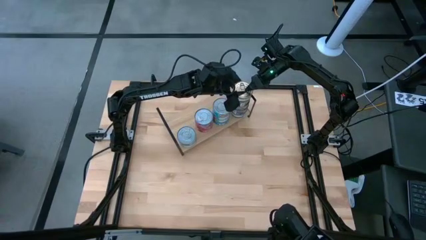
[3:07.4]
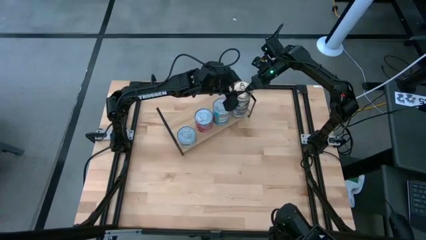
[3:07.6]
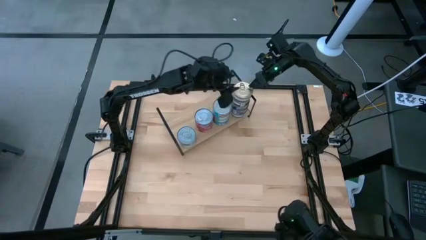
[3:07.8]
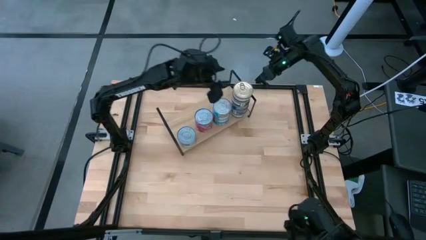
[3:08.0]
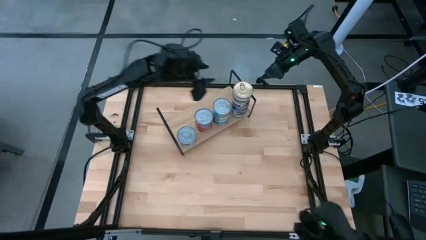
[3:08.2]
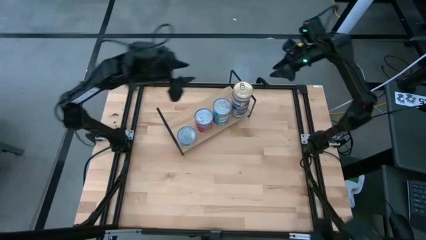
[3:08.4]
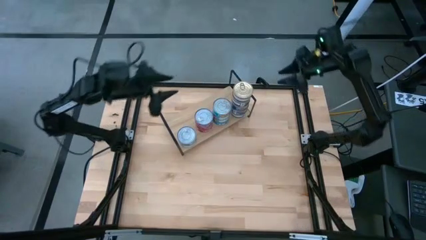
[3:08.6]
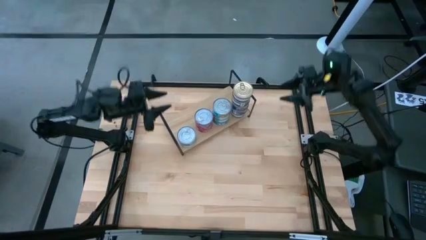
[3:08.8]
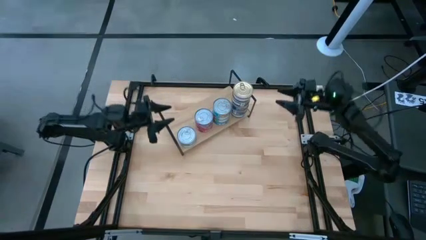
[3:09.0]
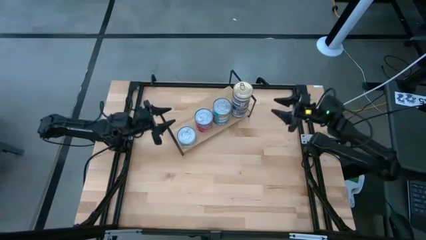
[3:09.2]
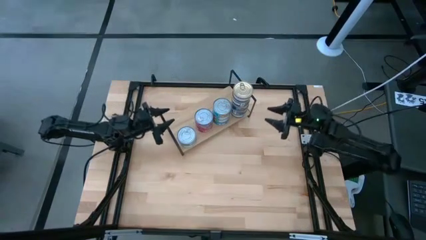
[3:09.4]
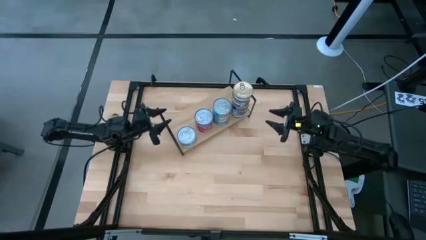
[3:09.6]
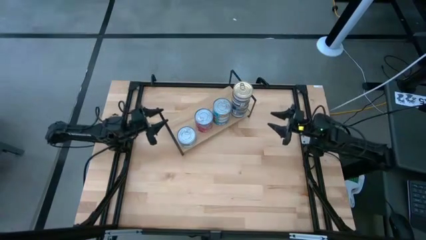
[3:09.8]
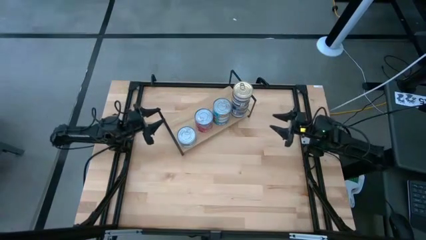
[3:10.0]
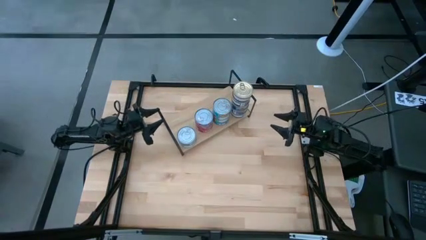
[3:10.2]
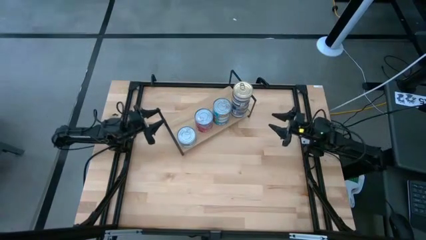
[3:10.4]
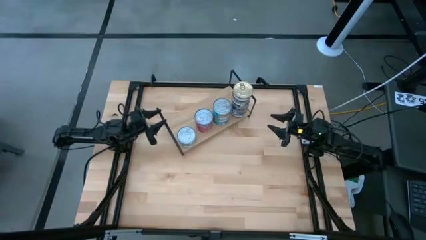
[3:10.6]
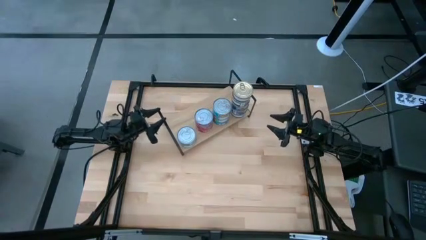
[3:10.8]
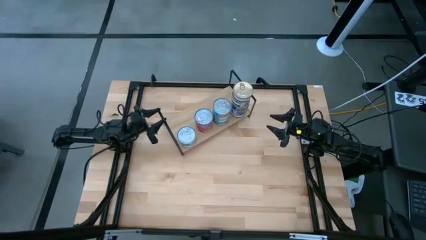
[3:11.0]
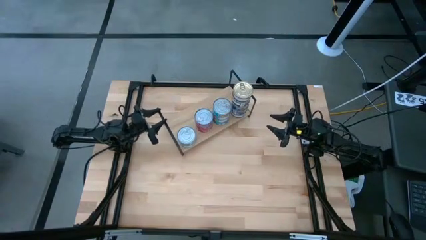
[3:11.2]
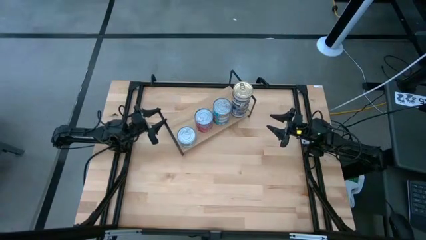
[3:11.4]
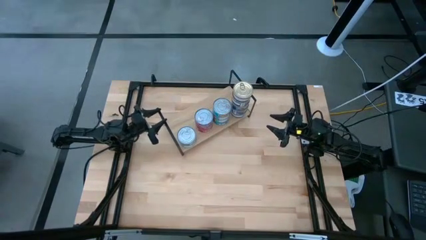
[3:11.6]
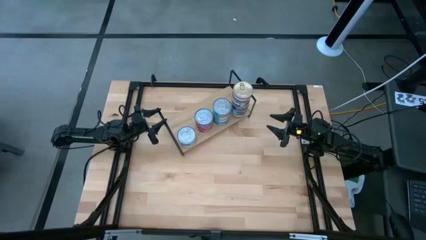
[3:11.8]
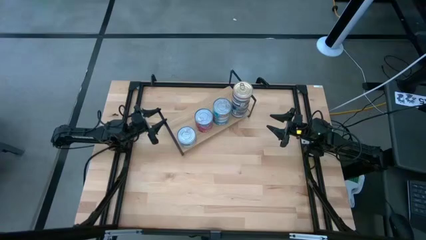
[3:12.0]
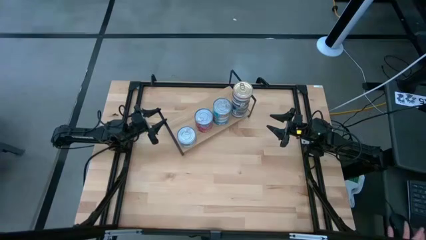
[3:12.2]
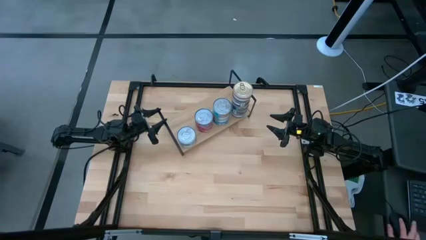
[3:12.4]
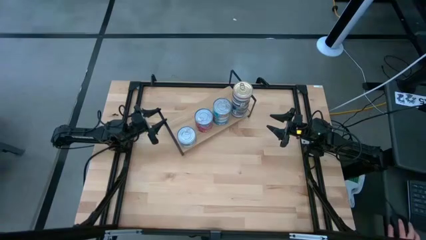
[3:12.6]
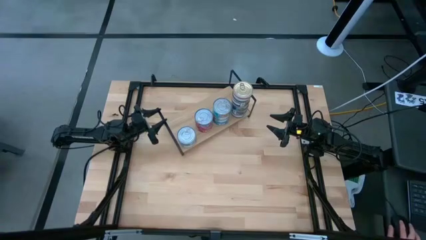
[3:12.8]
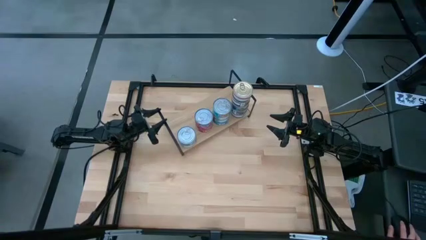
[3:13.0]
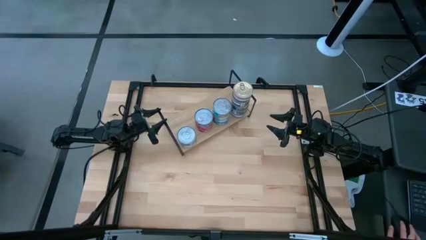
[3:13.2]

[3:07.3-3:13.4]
Task: Stack canned seafood by type on shelf
Return to Home Position

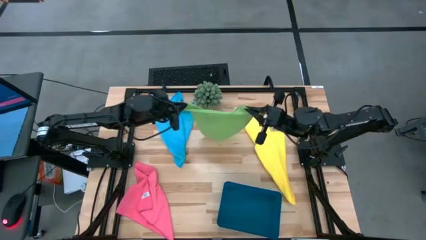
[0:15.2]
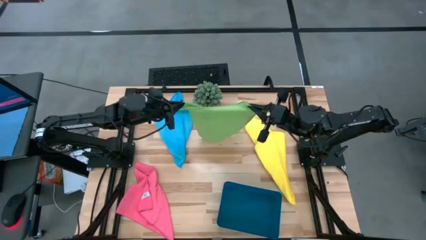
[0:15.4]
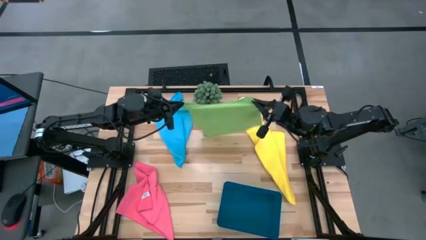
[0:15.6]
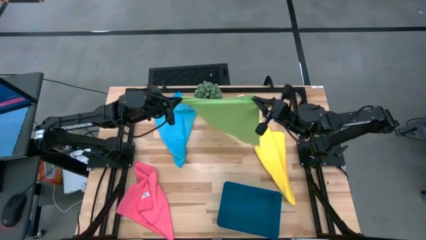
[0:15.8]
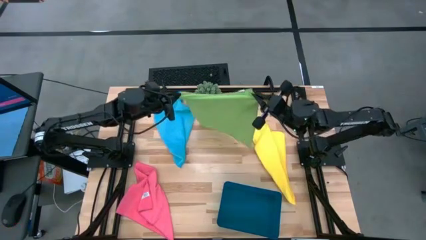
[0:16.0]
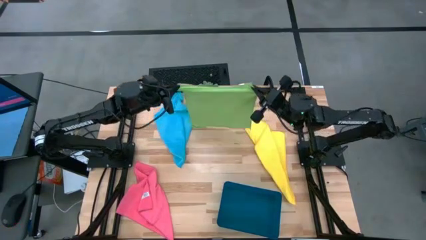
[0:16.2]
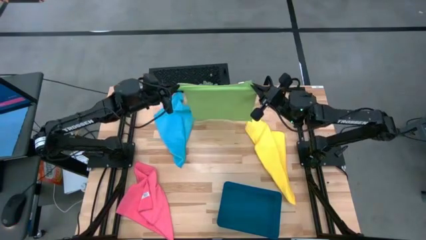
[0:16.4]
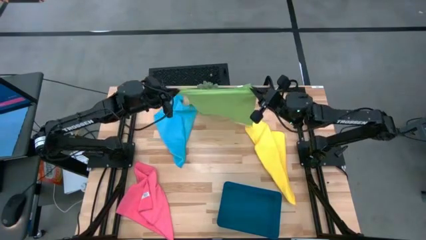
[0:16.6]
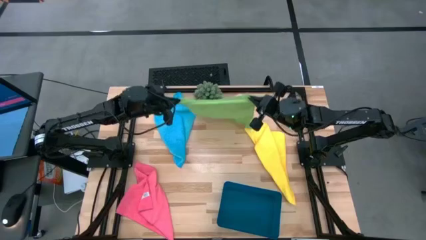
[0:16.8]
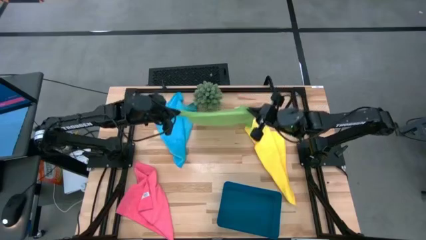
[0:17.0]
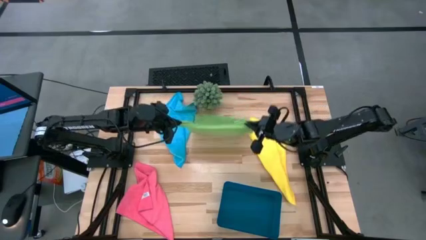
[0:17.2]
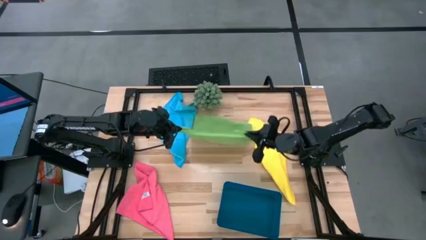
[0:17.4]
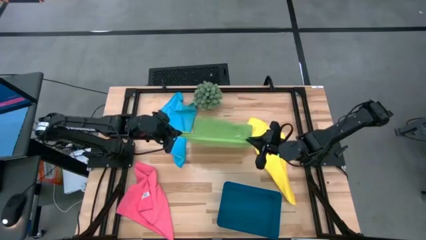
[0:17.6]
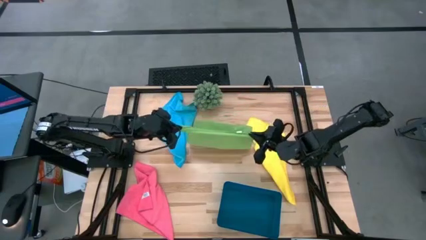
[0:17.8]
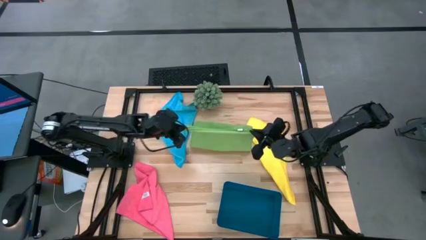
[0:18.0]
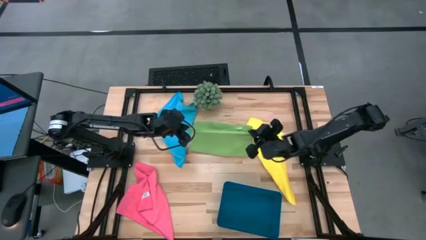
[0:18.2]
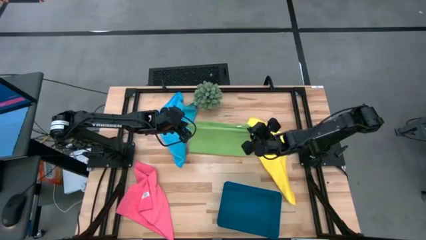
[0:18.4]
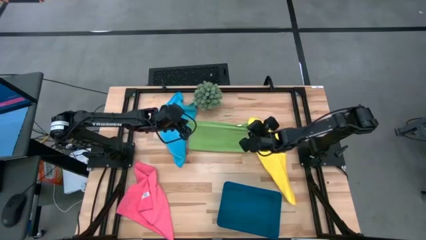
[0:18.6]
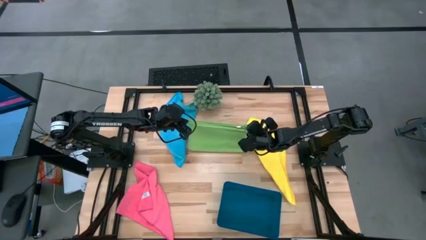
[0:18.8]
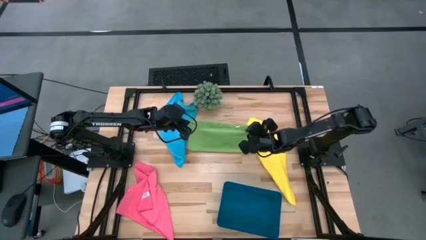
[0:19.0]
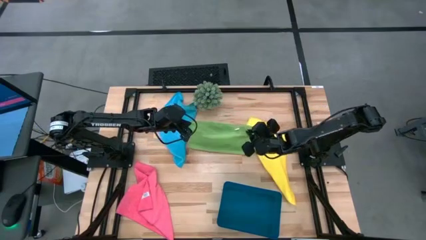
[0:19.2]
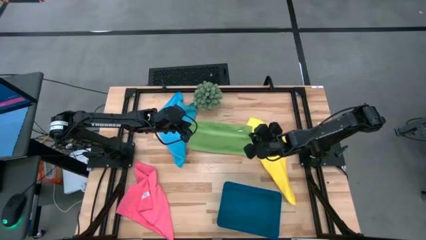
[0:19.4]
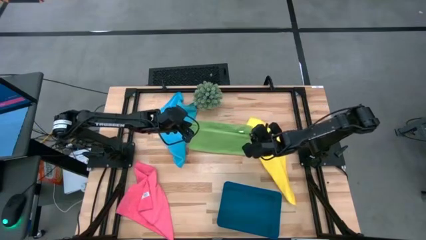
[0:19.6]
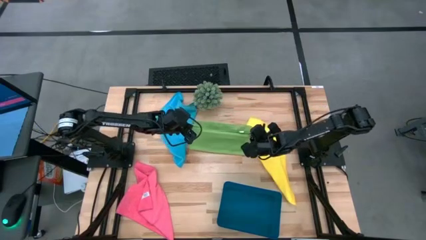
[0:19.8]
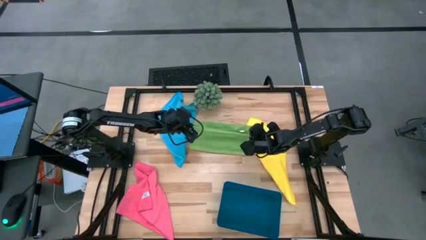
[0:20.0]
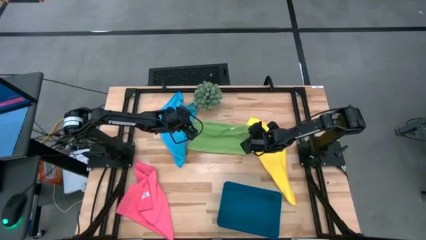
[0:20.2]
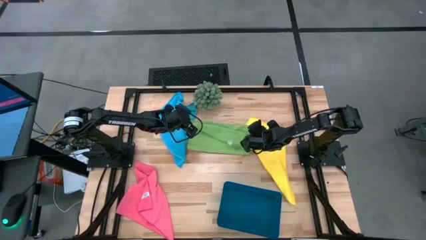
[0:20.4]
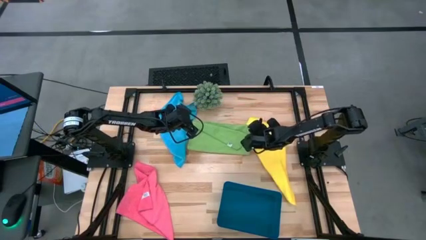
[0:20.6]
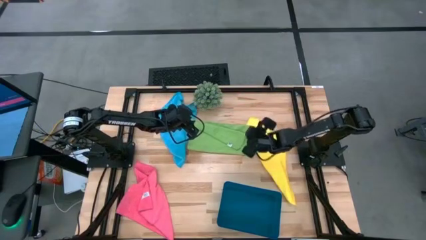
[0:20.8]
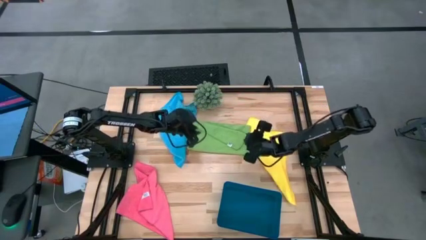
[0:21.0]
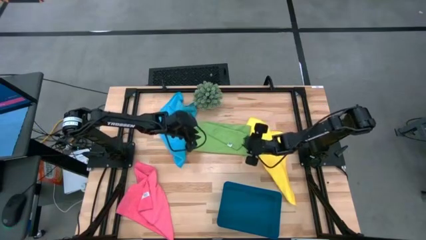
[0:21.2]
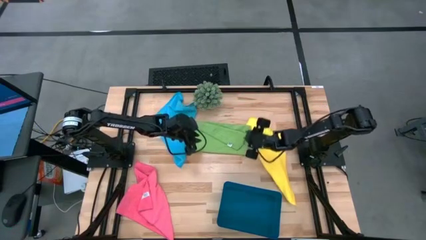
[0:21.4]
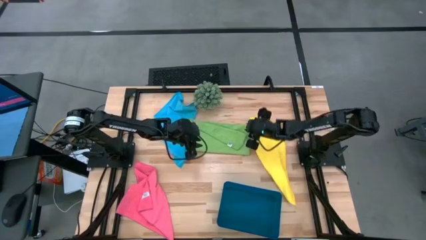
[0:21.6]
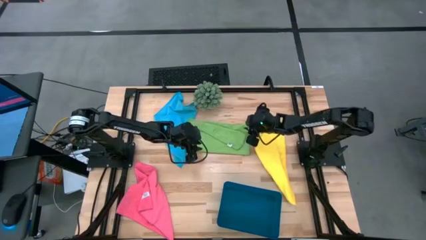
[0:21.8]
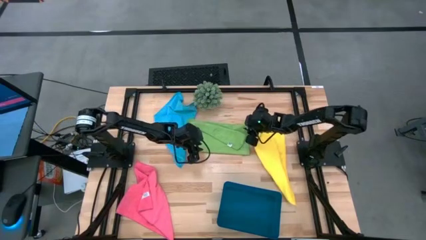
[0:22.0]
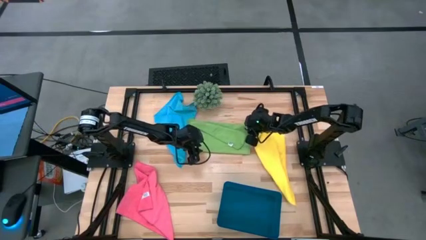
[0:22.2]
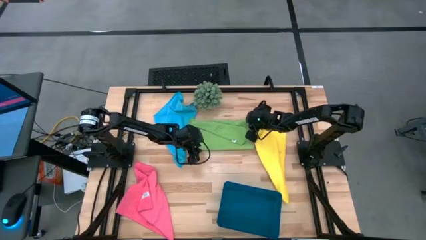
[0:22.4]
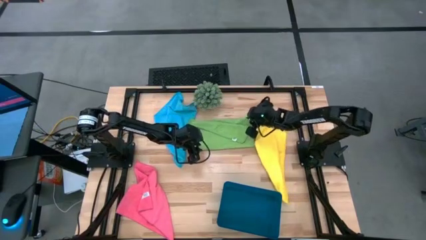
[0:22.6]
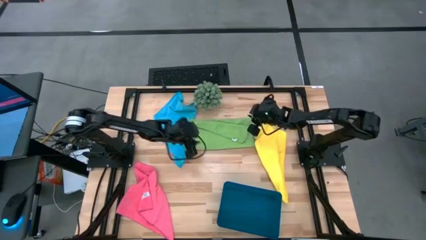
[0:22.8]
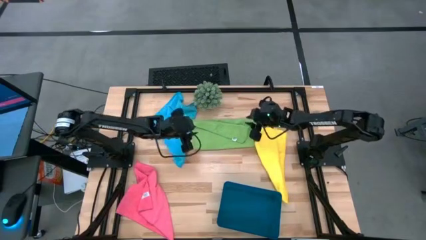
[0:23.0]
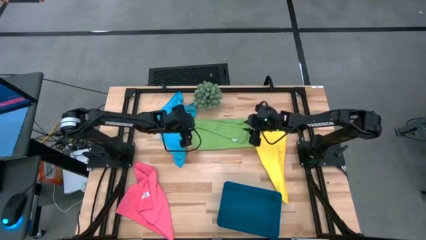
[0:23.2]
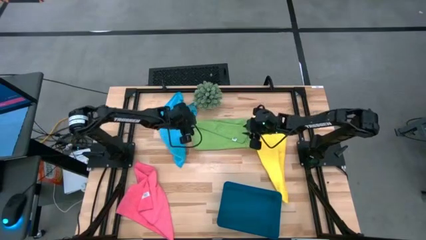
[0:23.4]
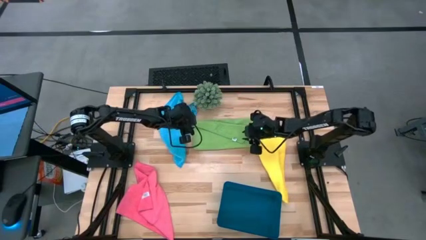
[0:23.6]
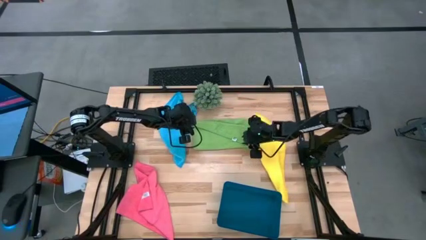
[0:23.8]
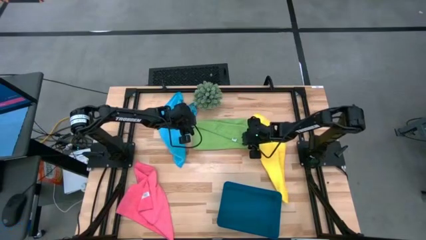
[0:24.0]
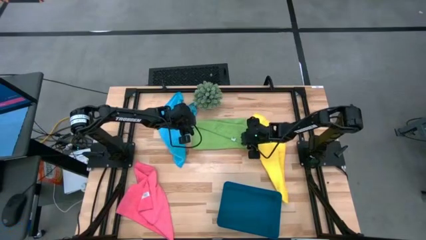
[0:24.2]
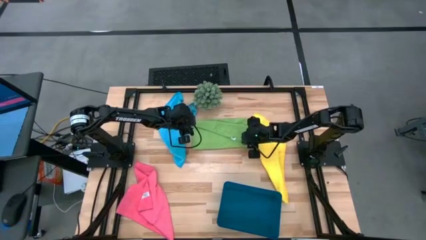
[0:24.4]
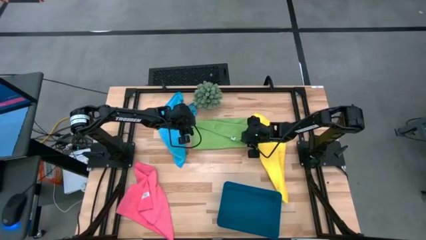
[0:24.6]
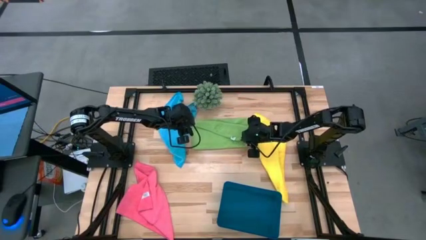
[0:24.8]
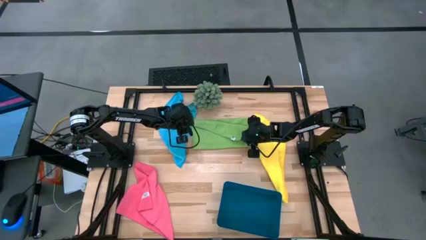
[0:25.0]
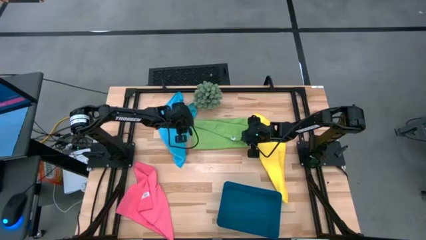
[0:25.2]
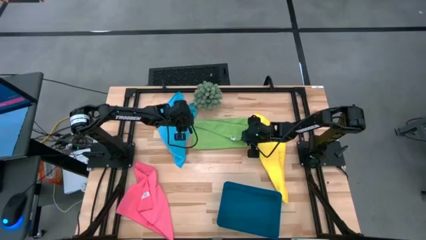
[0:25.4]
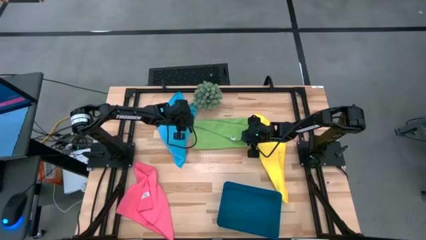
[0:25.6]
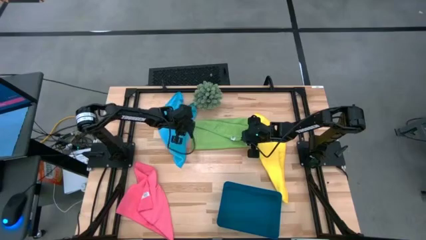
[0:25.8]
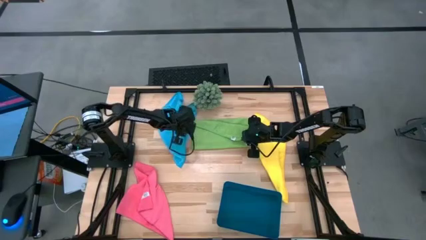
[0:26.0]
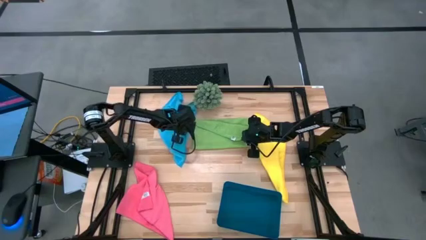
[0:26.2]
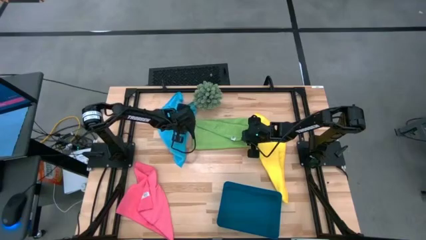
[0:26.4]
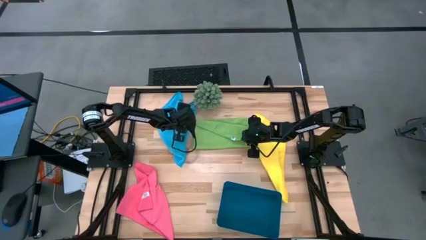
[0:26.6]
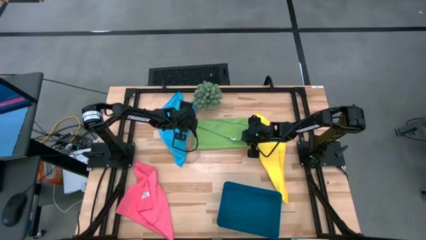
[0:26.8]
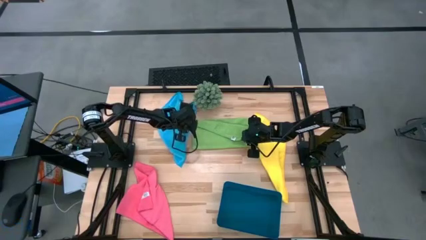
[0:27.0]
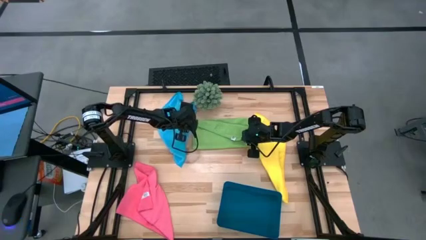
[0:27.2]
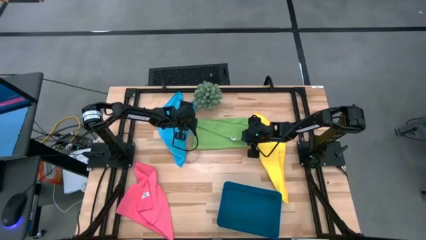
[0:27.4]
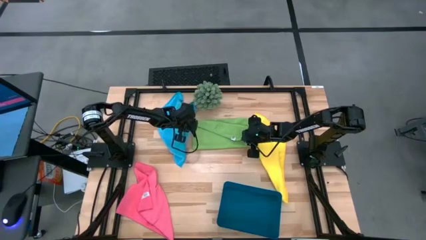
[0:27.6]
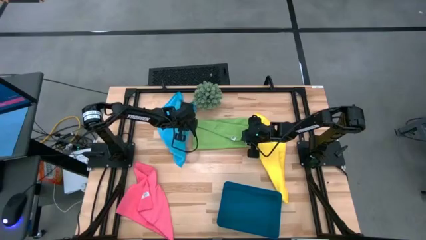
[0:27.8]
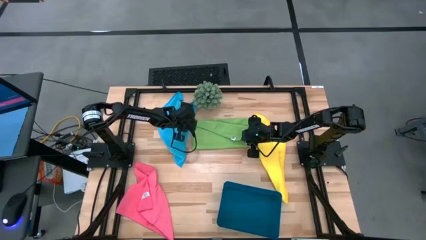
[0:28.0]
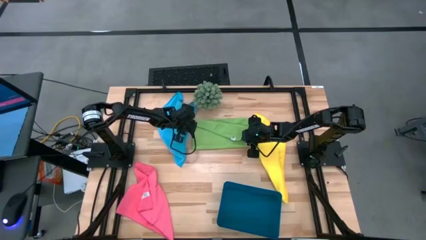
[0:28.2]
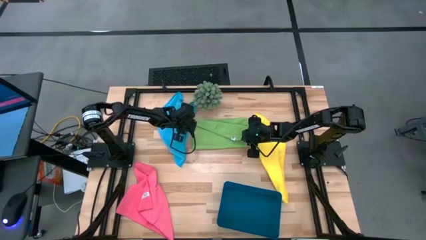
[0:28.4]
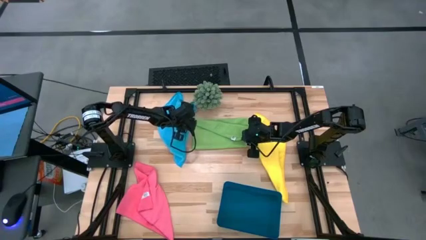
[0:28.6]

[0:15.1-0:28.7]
Task: Fold microfiber towels
Fold the green microfiber cloth
